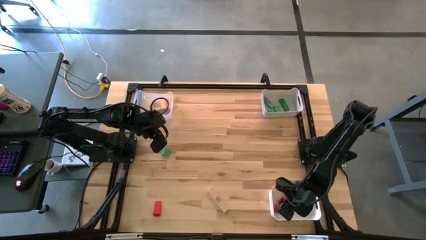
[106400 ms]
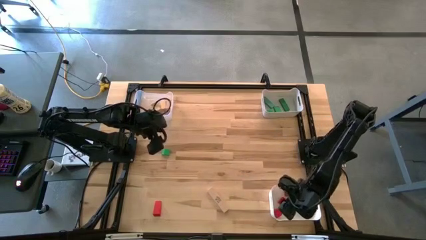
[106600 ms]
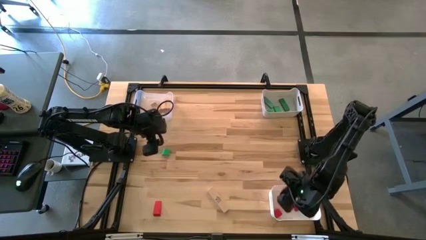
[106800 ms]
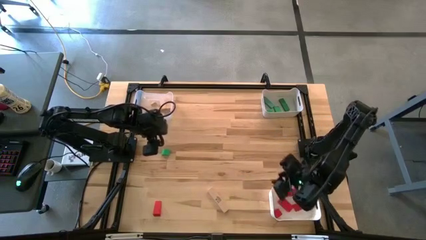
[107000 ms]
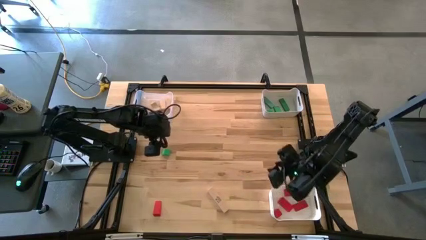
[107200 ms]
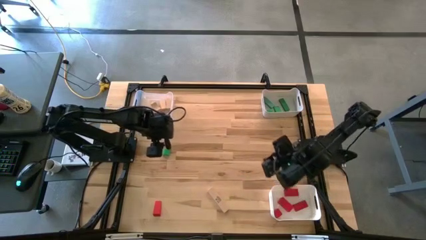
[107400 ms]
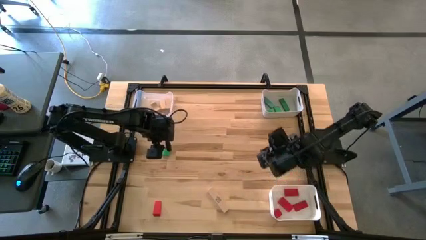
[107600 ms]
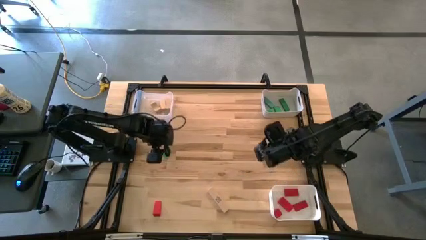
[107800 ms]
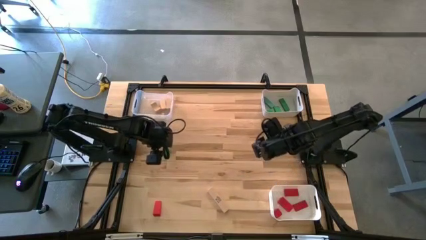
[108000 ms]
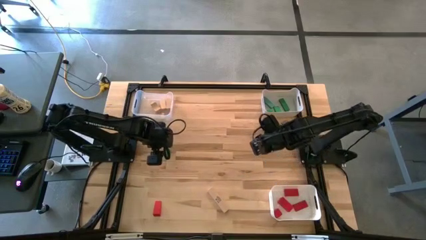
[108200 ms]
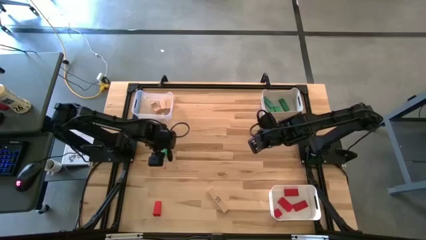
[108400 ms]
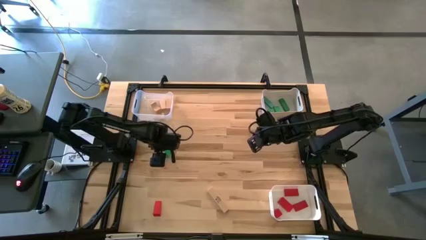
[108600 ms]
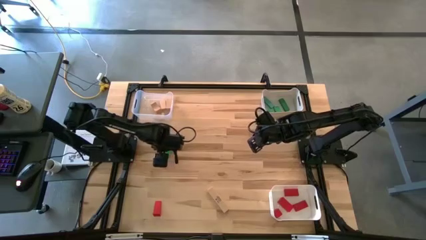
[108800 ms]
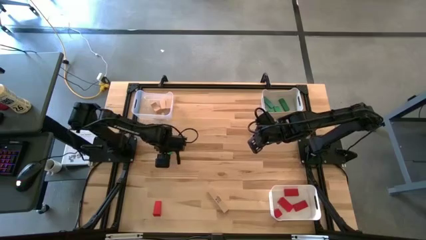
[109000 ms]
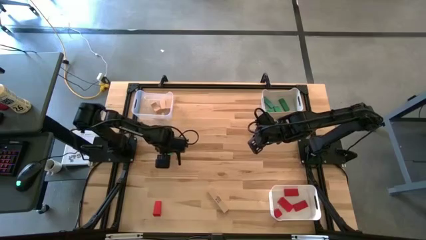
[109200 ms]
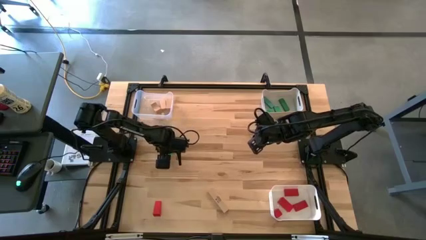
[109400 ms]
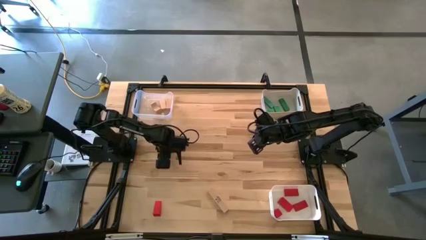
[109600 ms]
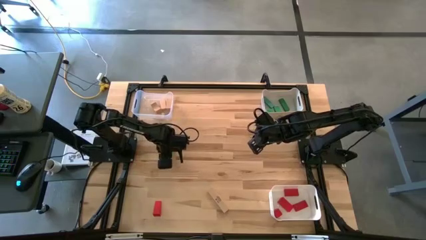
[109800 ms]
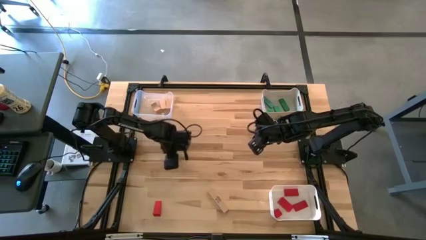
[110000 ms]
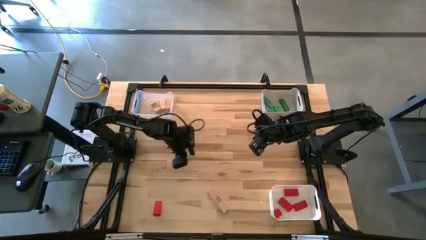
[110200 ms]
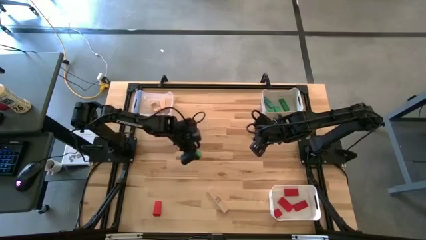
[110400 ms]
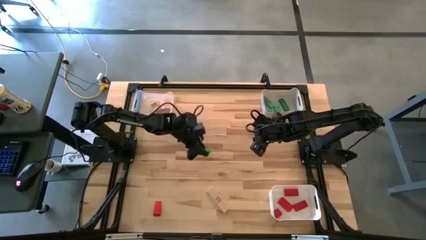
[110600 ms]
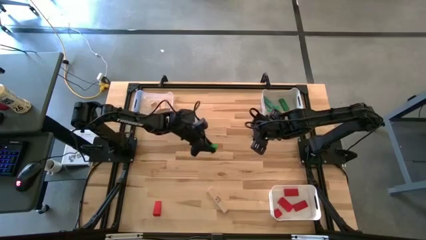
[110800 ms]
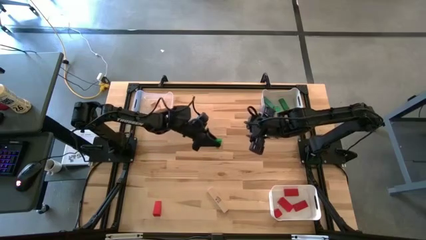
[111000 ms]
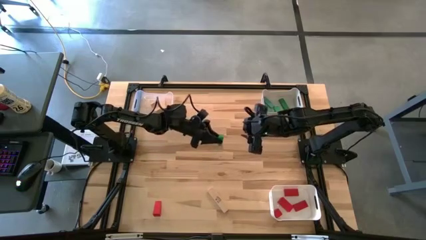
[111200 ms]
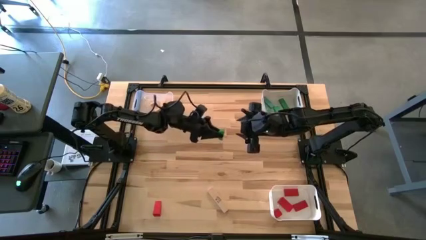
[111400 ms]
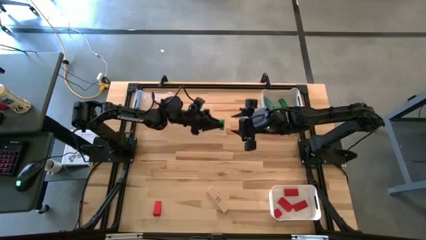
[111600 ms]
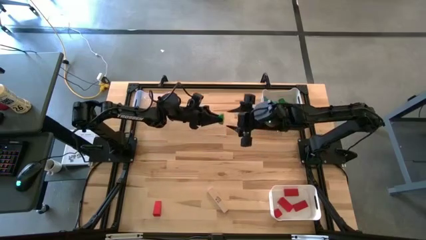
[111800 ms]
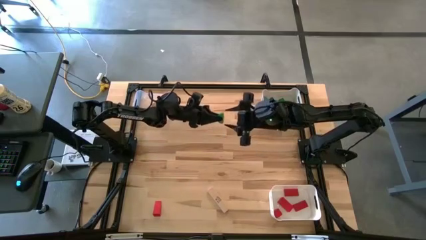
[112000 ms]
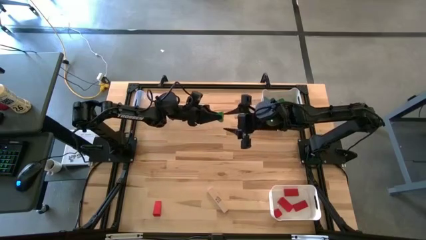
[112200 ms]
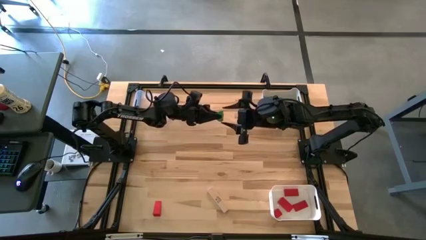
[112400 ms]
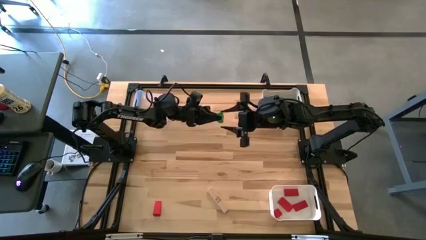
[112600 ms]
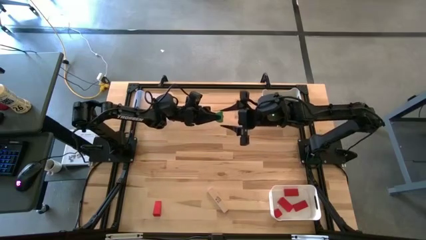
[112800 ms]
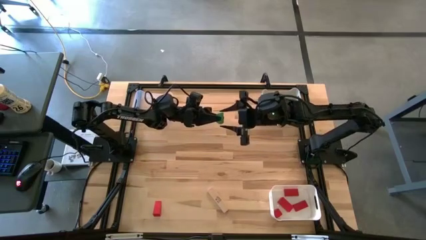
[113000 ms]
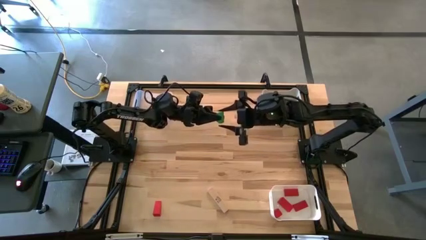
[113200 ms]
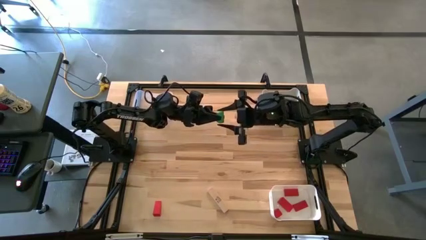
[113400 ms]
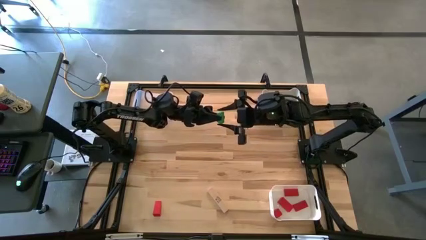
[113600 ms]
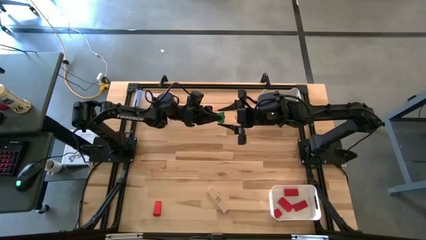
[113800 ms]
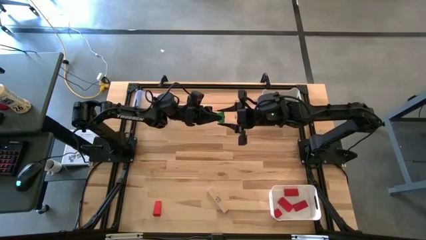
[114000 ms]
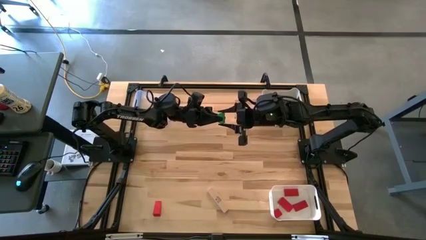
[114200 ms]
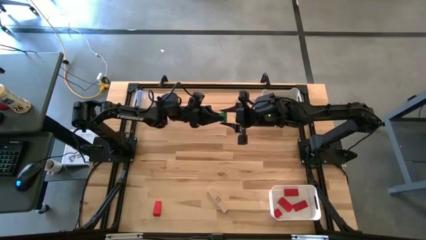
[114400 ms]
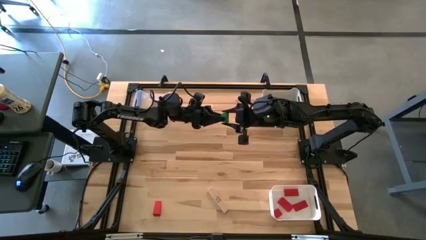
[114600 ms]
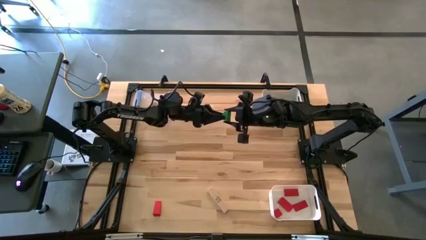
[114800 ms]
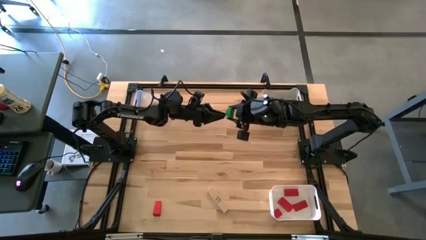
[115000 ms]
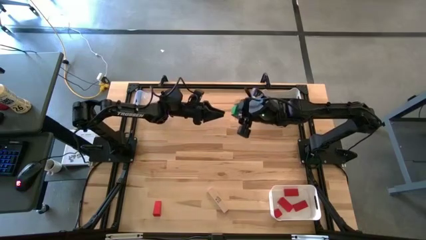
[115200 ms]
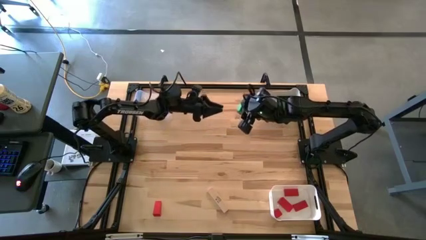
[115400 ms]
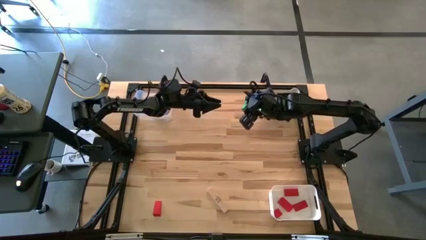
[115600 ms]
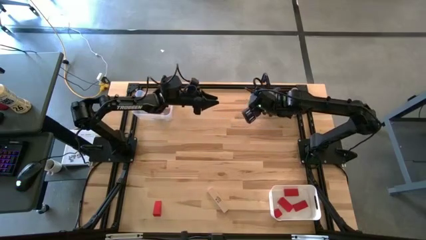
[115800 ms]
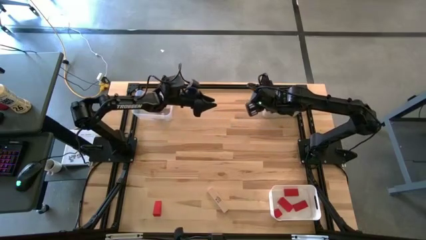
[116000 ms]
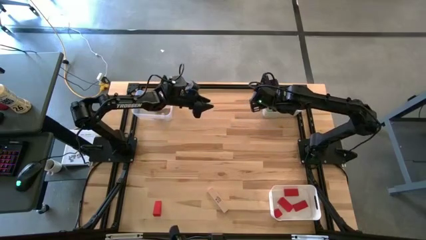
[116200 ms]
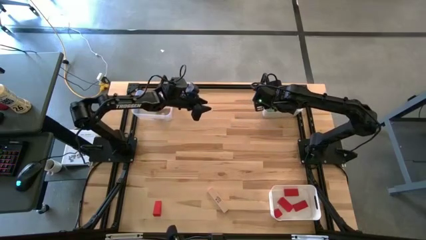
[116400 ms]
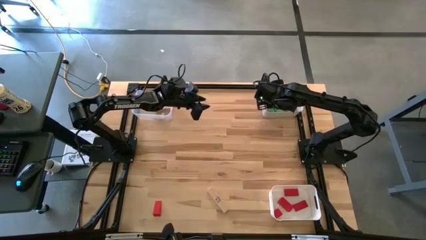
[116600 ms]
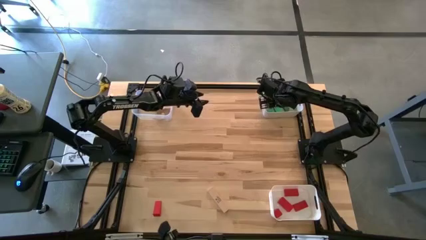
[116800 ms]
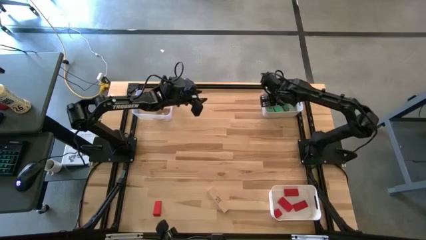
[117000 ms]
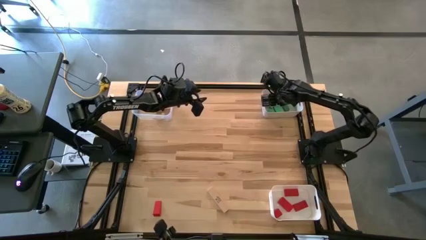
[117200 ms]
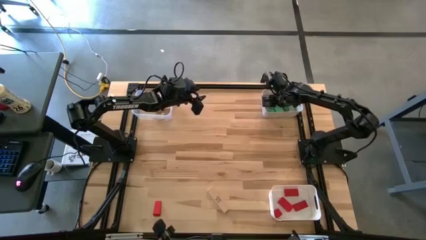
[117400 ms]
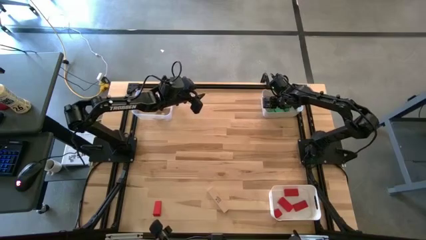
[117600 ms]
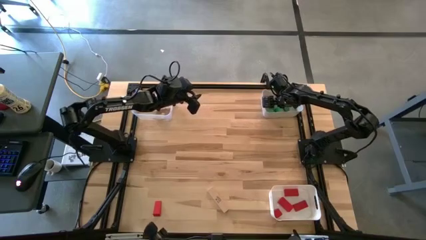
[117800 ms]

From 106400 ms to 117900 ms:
Task: Sort & place blocks by color
Put the green block into the gray bin

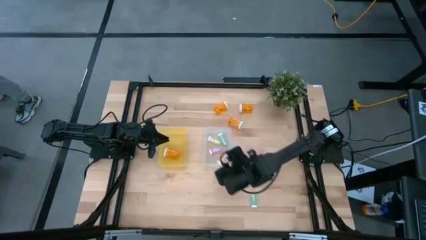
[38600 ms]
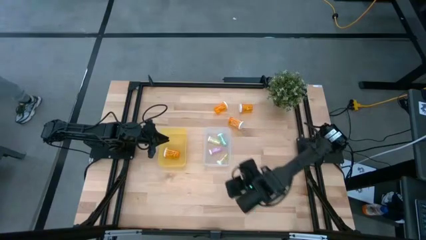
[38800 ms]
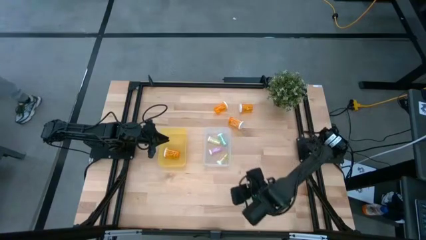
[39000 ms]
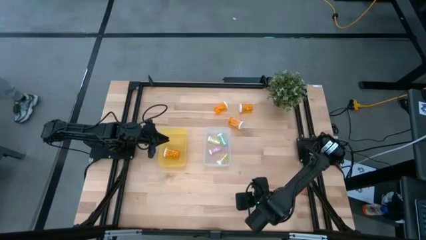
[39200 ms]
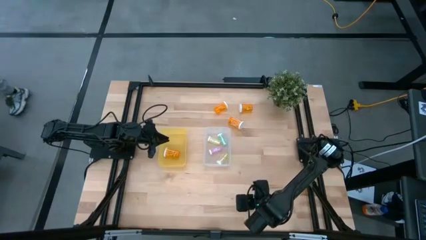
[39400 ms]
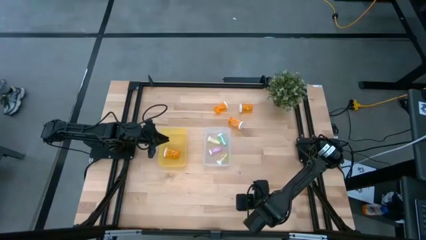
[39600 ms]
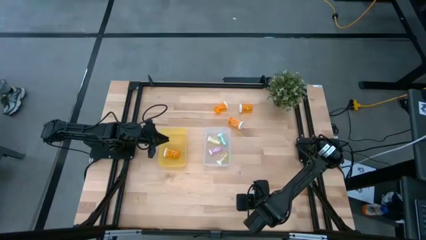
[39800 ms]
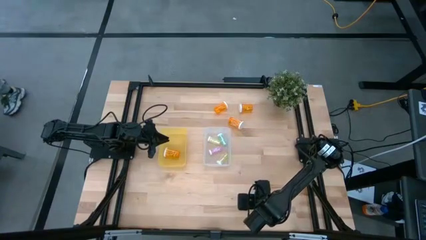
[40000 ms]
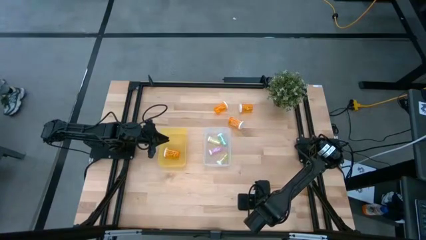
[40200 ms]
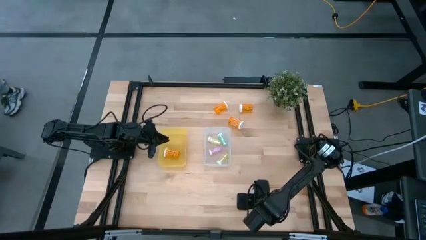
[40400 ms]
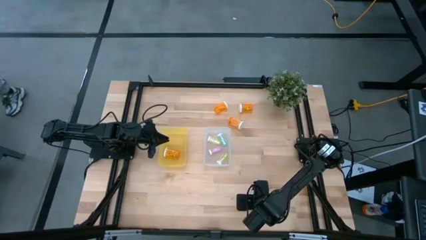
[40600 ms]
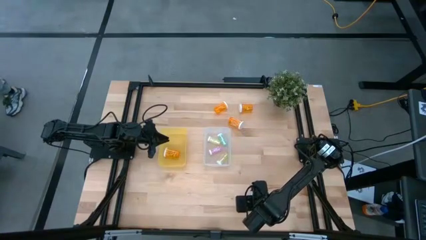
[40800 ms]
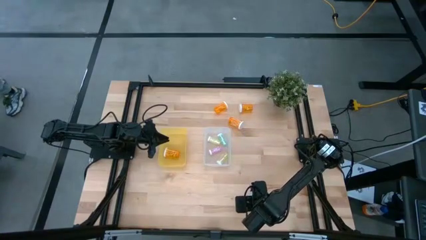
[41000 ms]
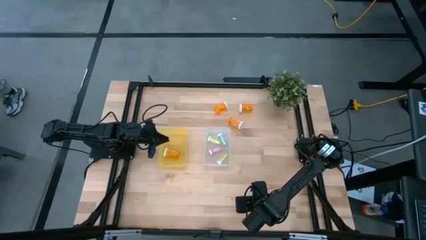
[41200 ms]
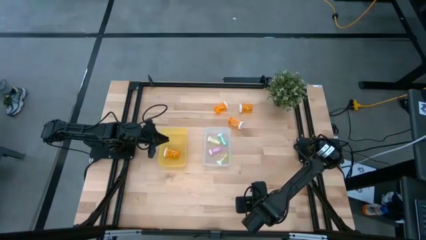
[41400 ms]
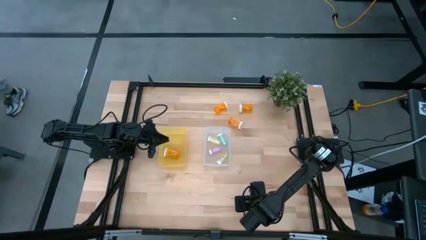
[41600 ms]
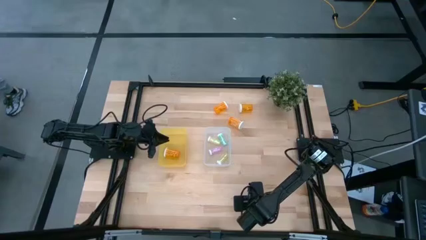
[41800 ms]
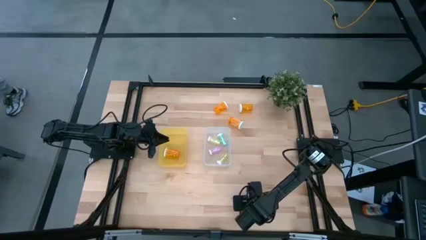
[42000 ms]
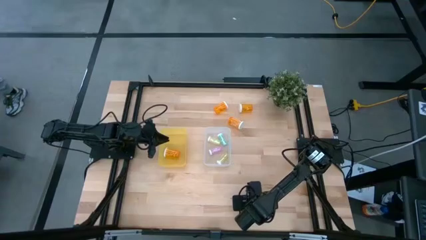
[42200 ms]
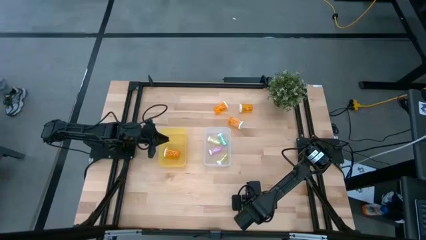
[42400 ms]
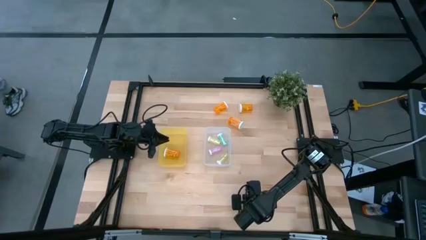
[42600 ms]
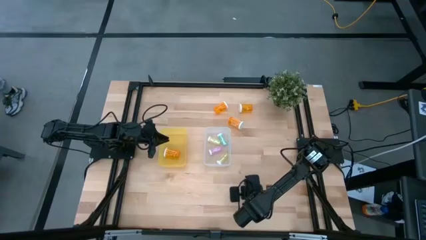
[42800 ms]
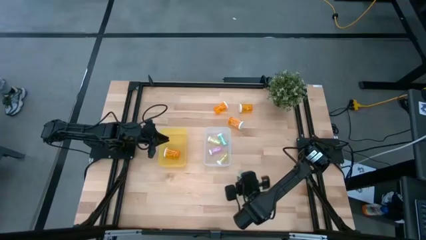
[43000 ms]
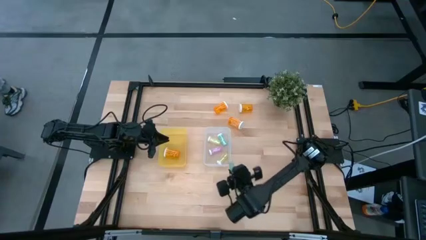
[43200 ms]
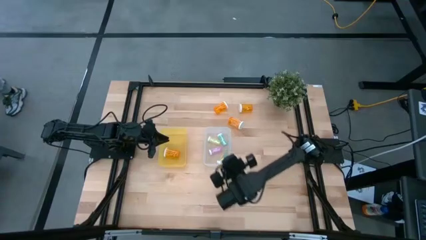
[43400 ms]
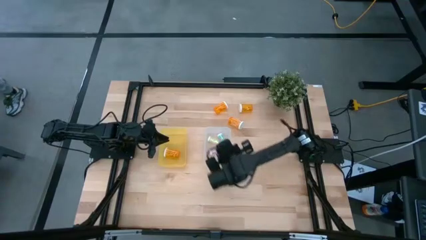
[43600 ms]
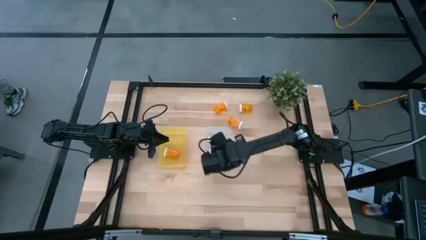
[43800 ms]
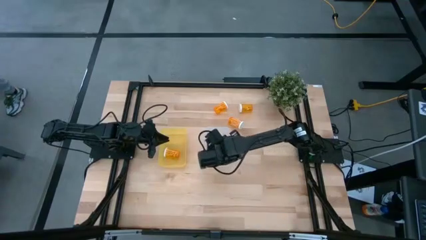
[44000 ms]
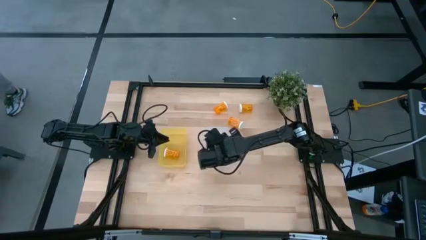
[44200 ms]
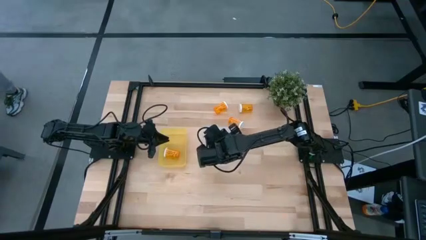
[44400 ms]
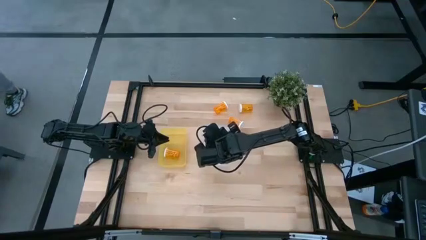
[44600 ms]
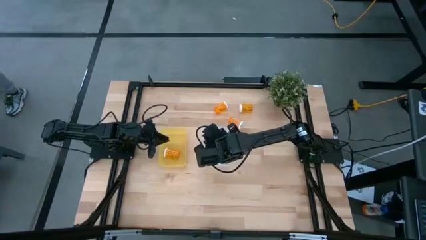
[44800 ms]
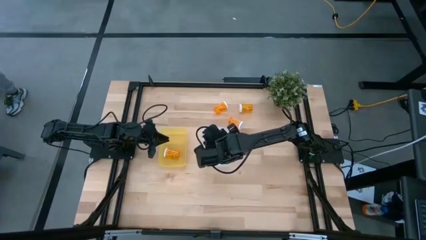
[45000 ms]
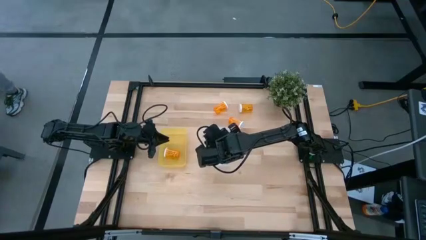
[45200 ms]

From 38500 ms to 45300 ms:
Task: Pick and place medicine bottles into bin by pill shape (circle, oval)
Put the green pill bottle into the transparent bin
